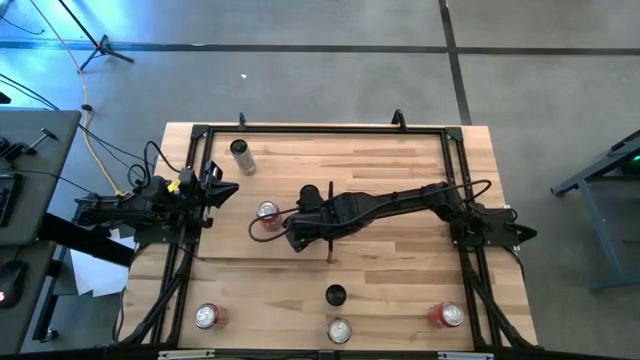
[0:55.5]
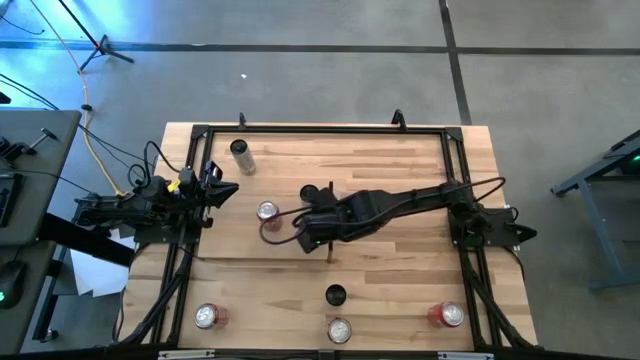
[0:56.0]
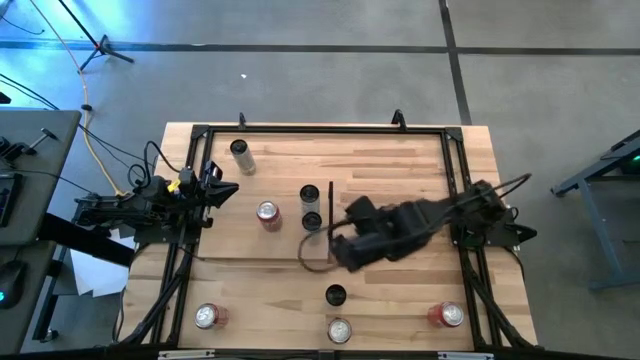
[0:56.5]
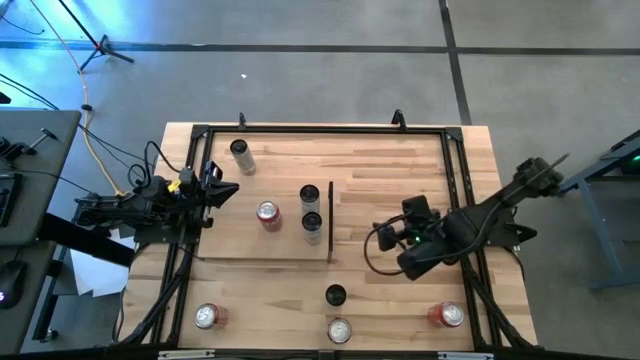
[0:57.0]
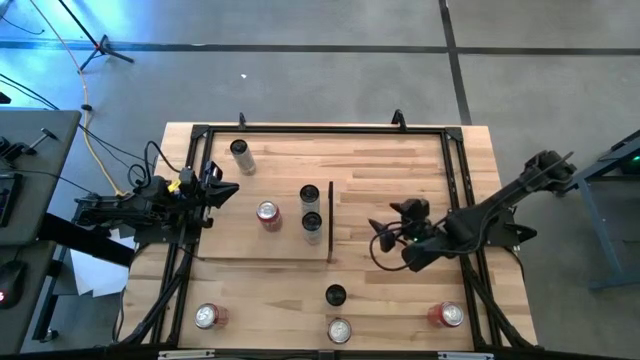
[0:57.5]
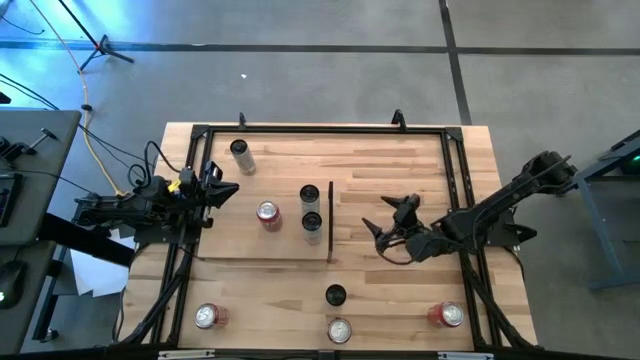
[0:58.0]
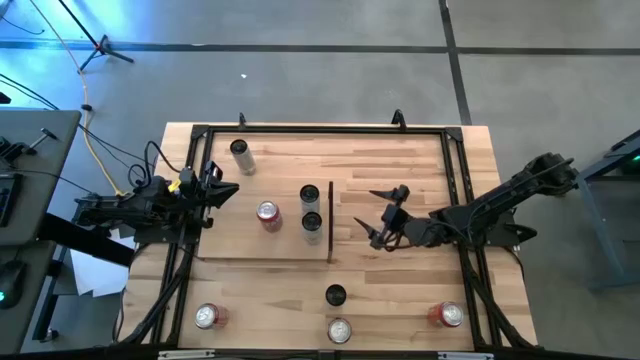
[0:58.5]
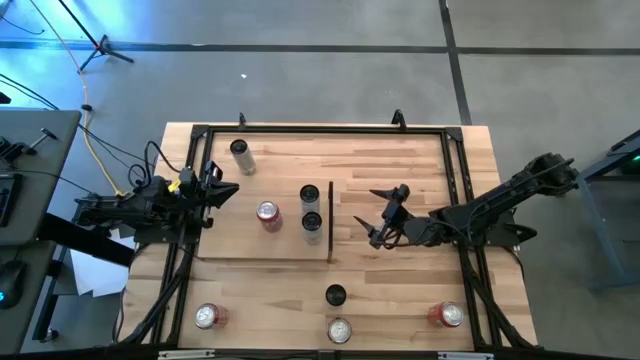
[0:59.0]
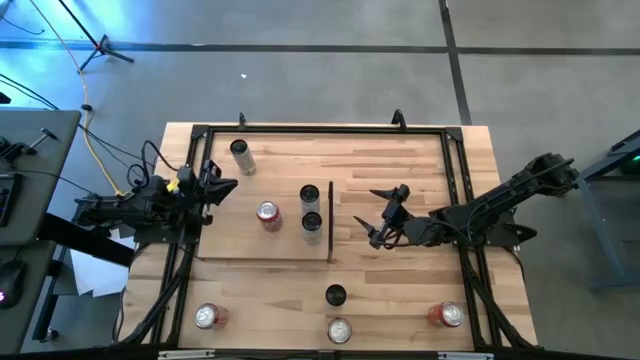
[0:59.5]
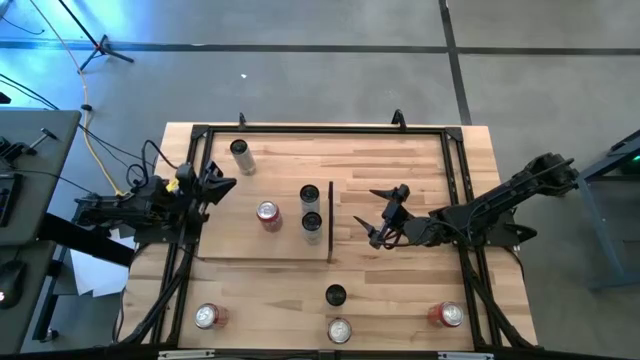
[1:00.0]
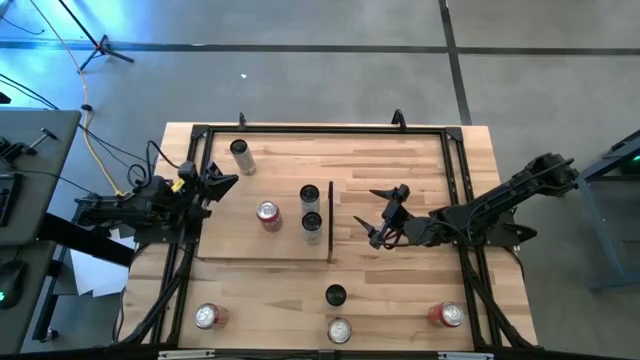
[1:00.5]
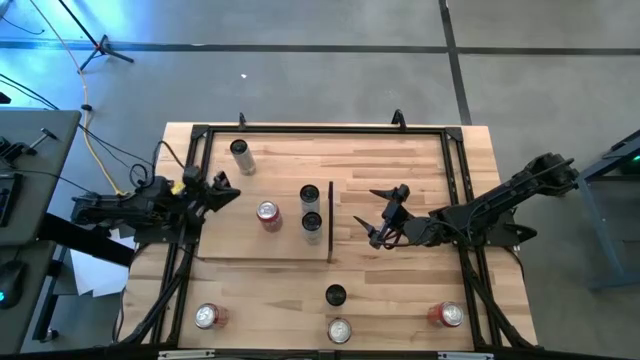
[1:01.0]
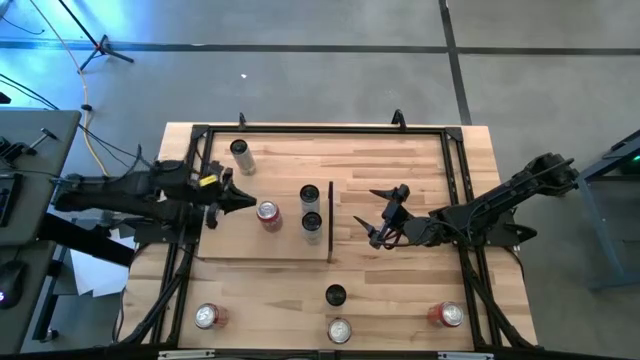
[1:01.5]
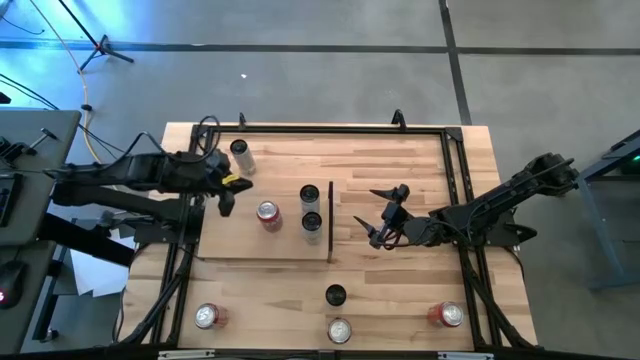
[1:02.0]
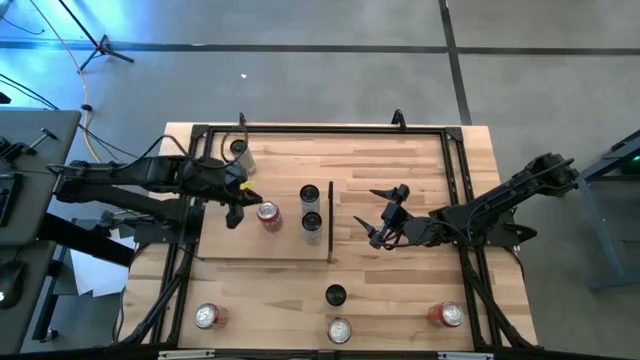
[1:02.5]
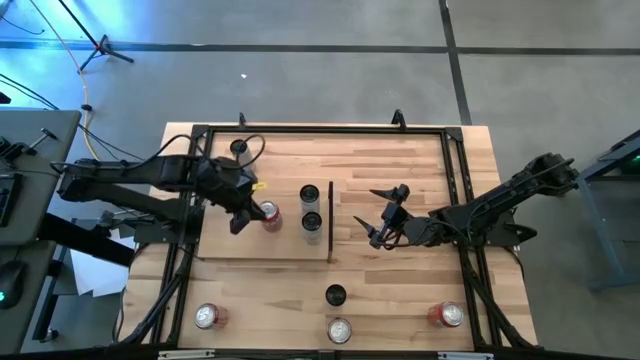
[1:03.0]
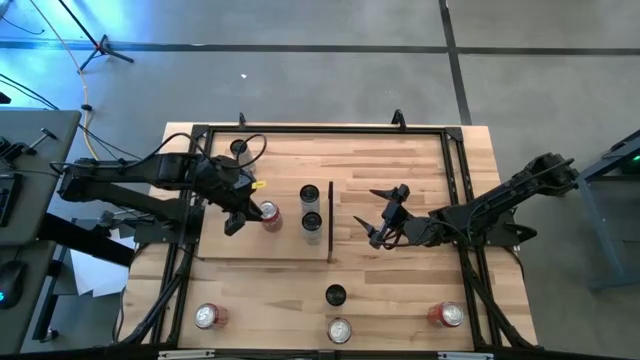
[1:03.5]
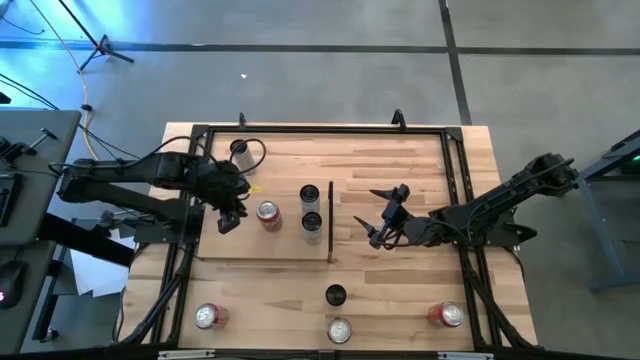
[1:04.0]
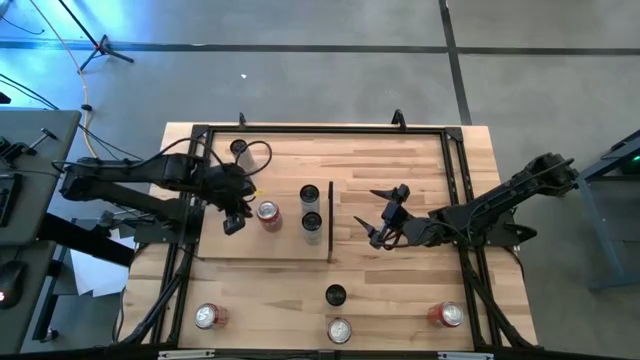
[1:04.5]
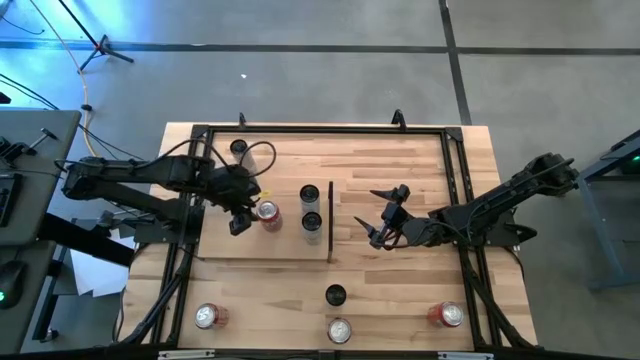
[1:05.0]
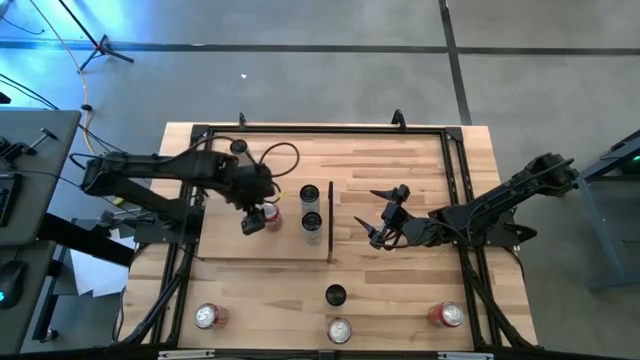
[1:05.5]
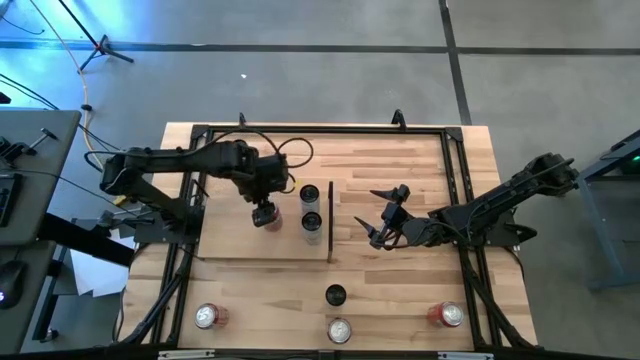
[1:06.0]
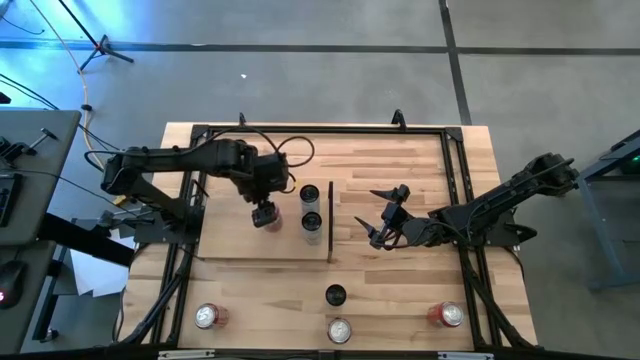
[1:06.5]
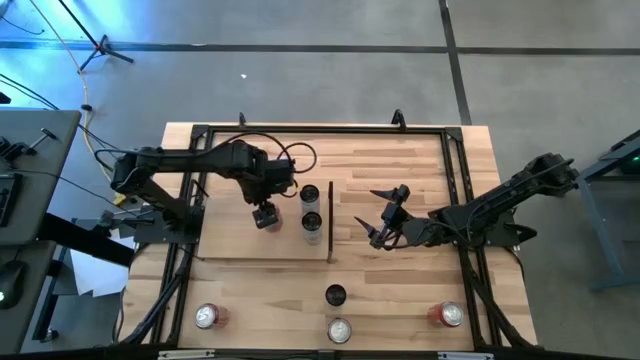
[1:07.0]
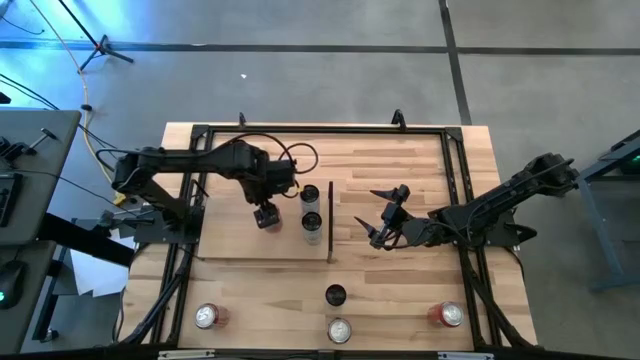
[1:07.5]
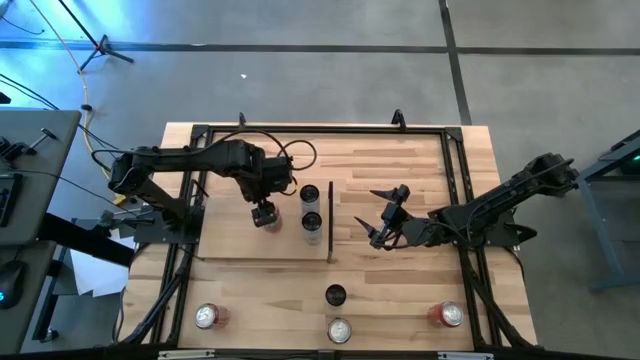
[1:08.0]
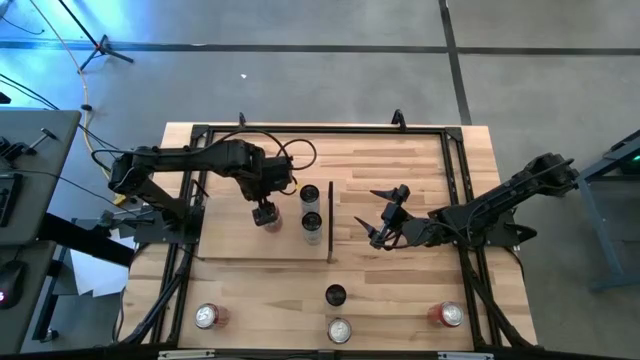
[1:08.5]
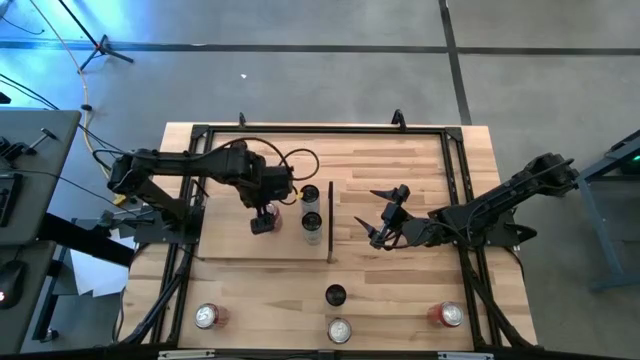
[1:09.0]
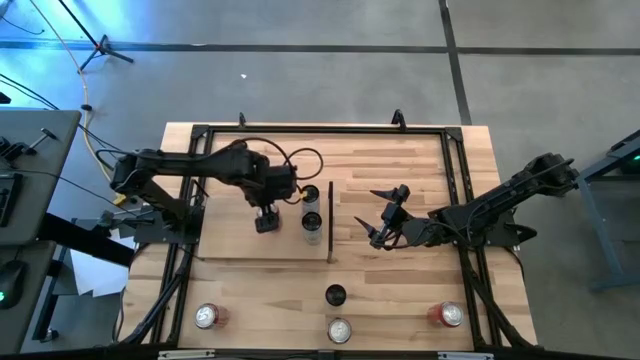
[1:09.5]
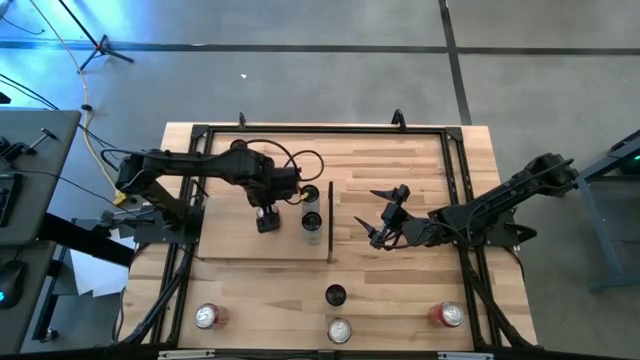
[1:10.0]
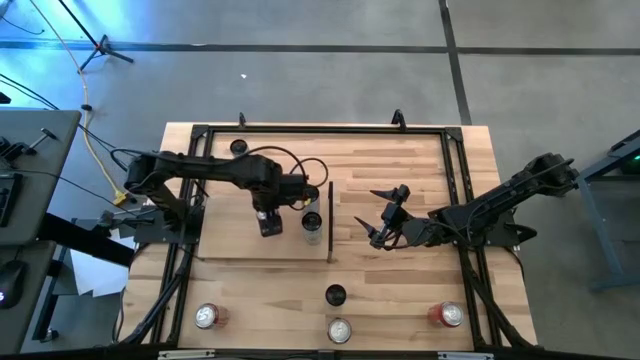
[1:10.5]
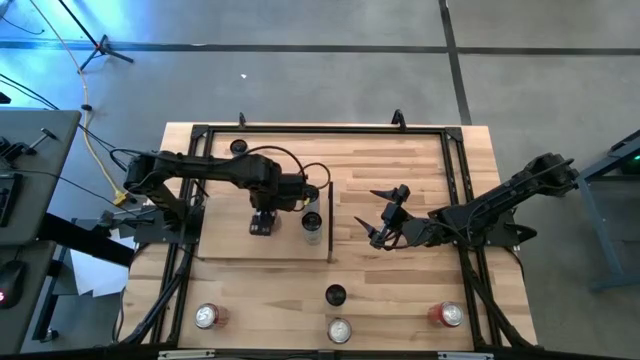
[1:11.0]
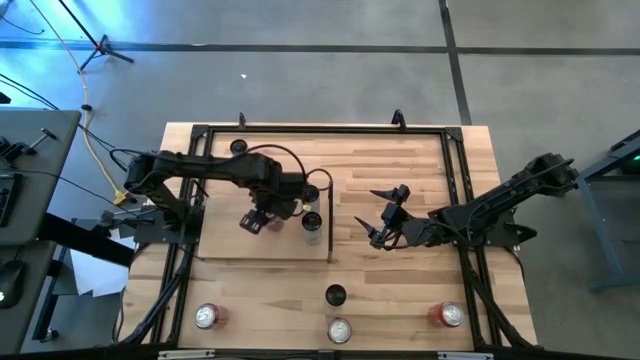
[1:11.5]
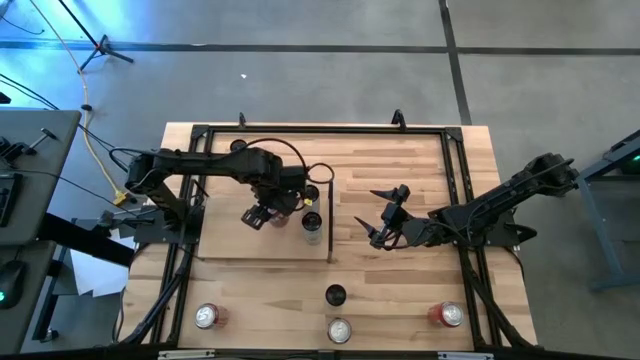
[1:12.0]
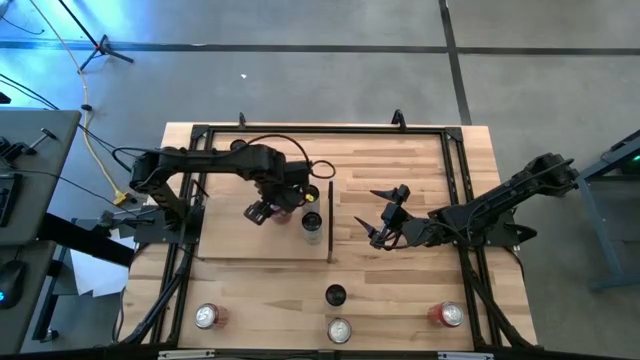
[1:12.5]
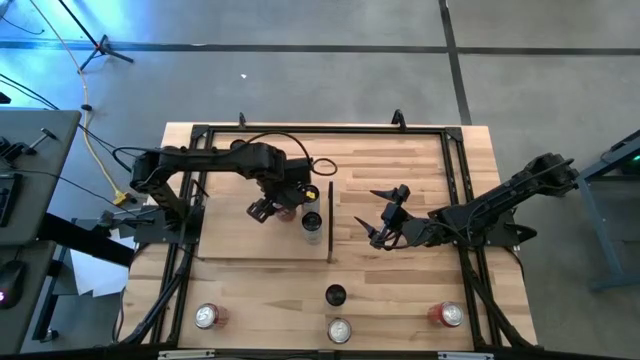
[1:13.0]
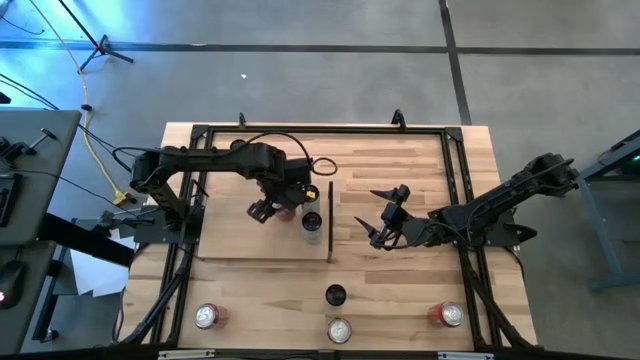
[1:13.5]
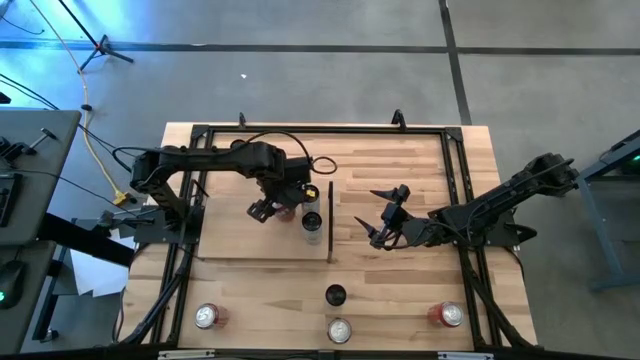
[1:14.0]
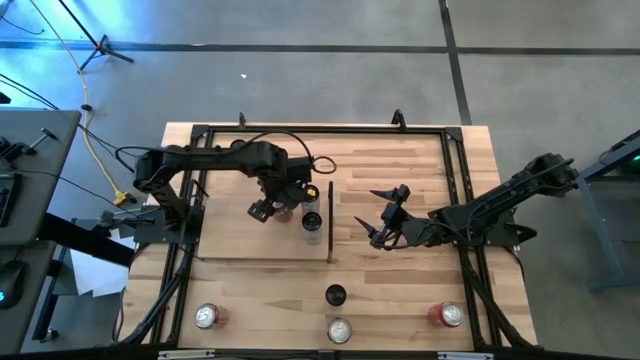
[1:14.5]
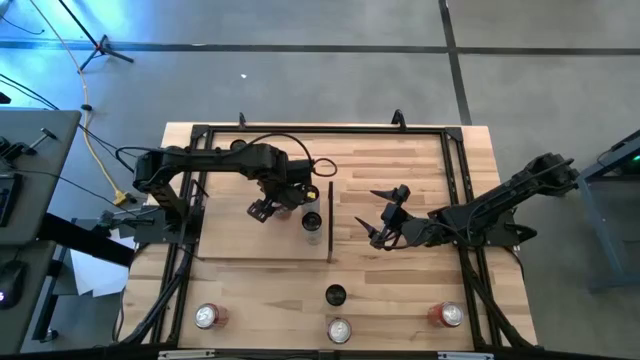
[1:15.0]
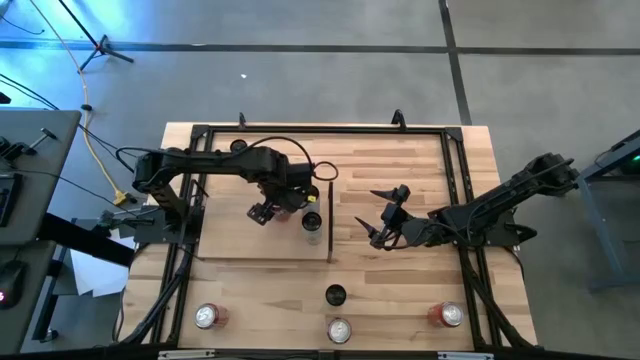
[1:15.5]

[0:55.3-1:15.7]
Task: Place canned beverage on shelf
Adjust the red soda can on the shelf
